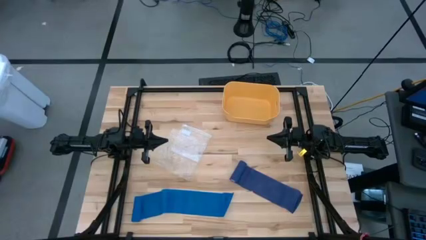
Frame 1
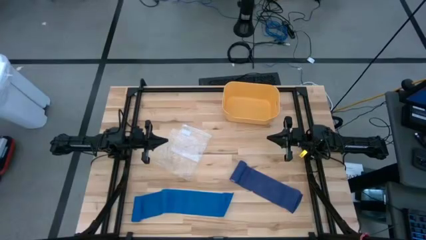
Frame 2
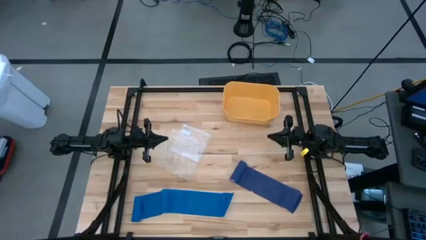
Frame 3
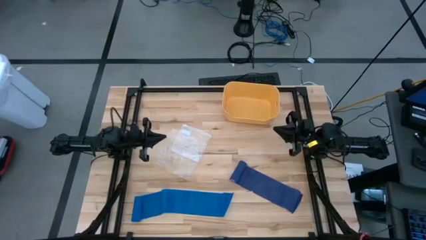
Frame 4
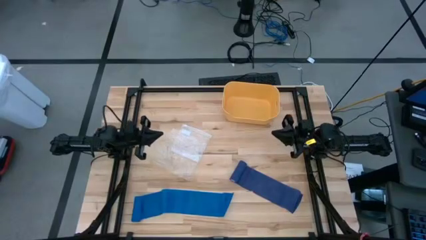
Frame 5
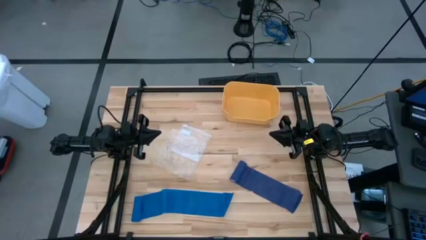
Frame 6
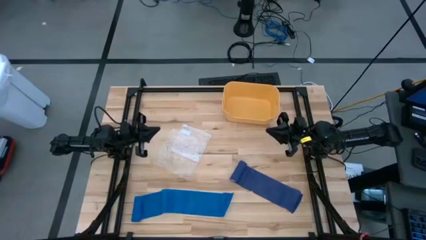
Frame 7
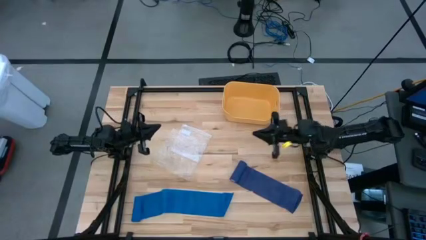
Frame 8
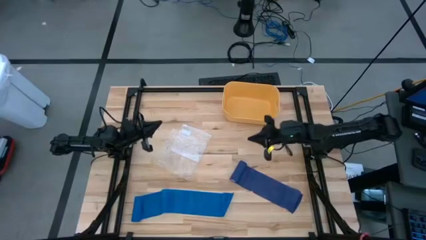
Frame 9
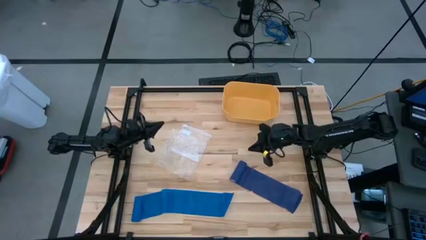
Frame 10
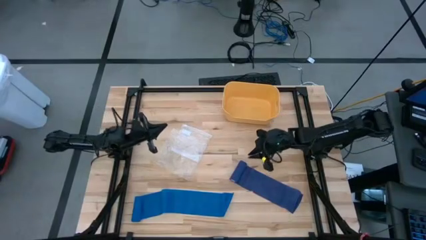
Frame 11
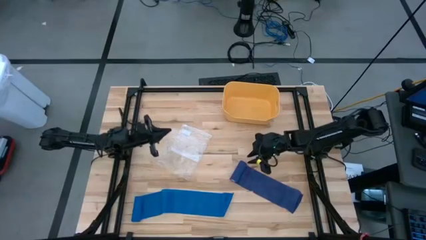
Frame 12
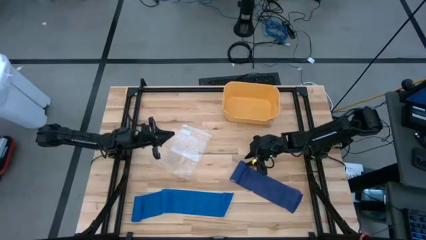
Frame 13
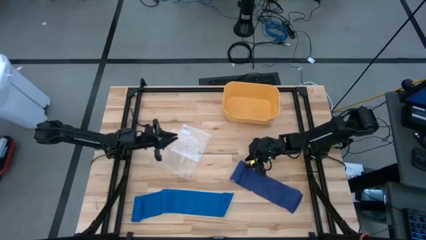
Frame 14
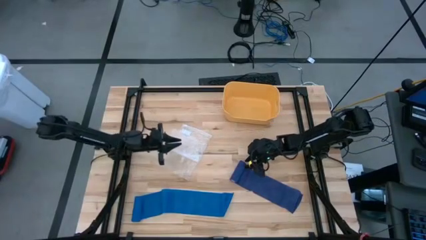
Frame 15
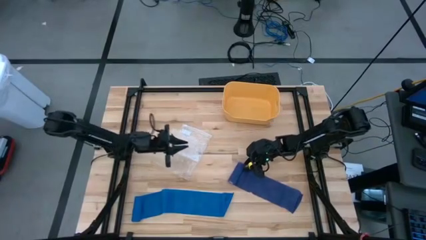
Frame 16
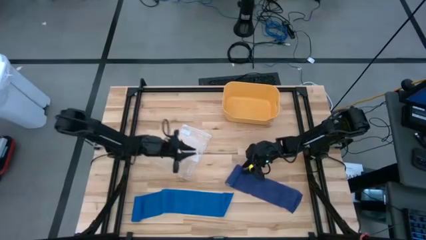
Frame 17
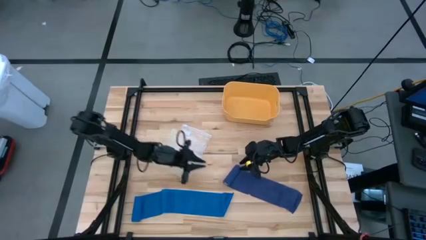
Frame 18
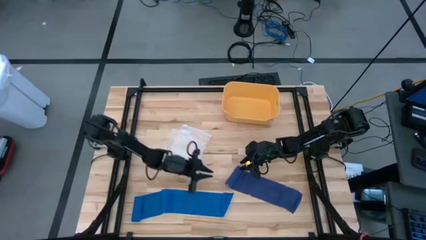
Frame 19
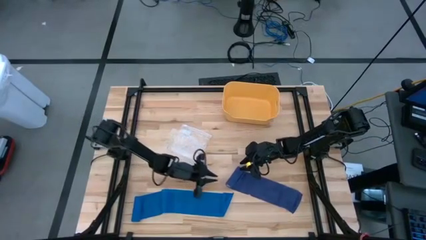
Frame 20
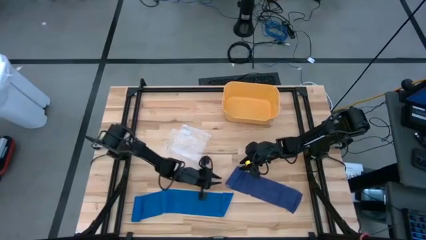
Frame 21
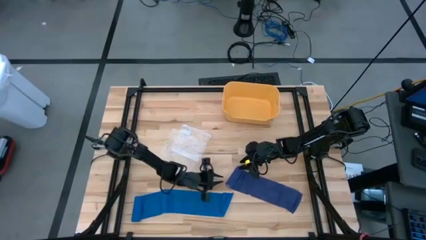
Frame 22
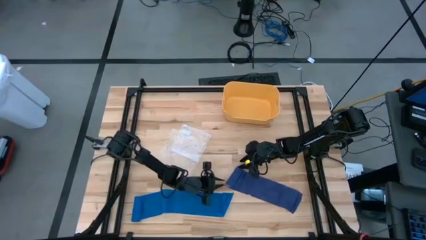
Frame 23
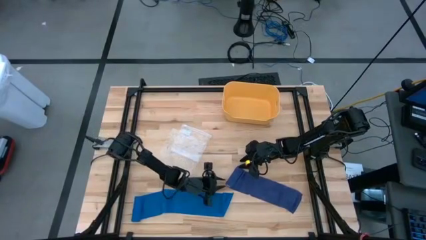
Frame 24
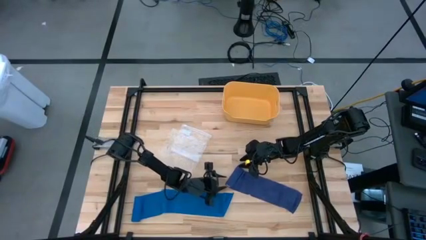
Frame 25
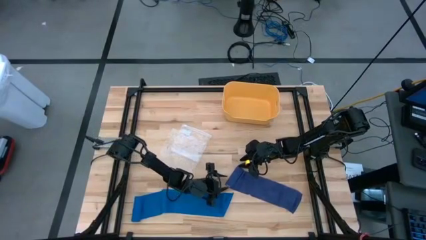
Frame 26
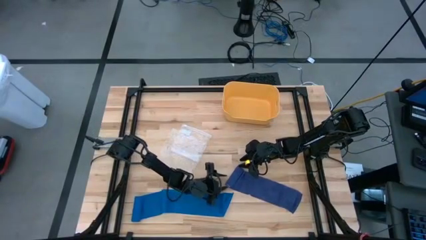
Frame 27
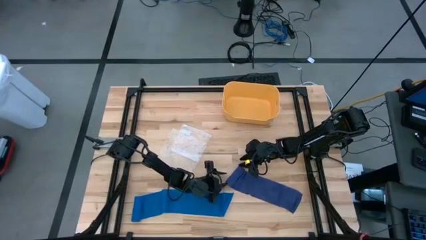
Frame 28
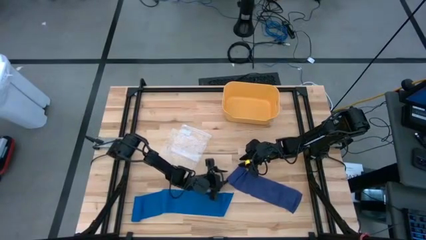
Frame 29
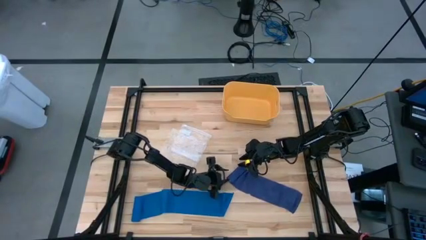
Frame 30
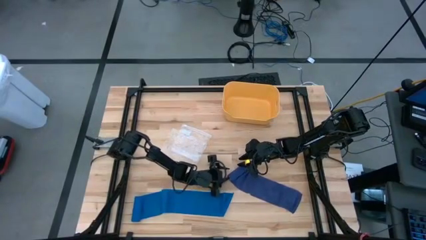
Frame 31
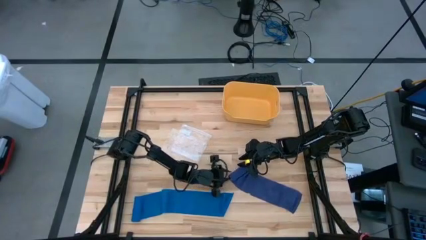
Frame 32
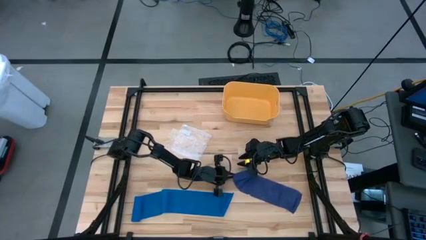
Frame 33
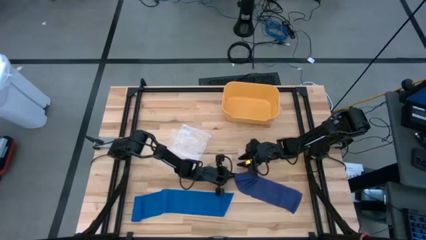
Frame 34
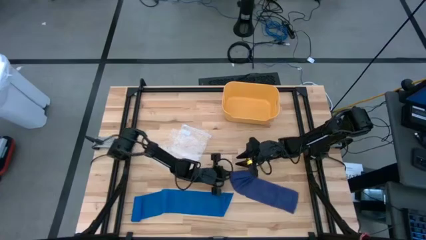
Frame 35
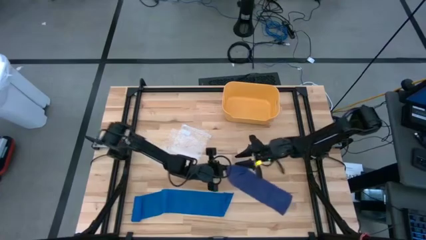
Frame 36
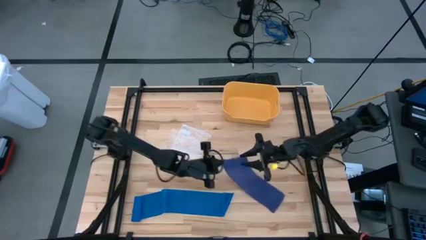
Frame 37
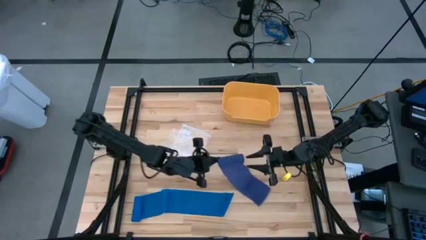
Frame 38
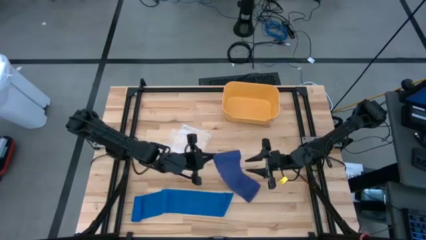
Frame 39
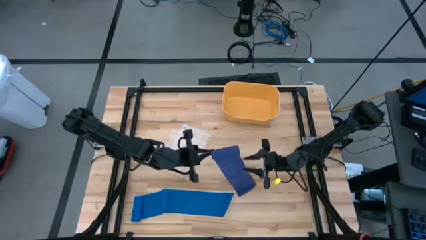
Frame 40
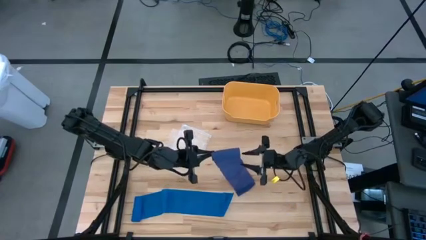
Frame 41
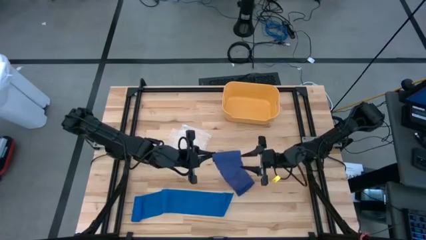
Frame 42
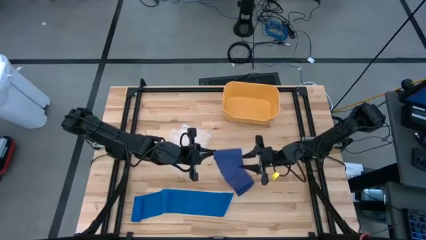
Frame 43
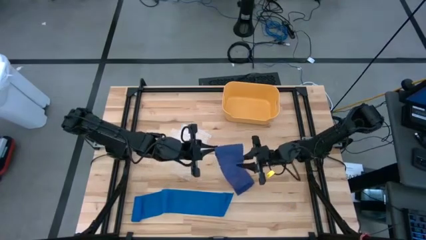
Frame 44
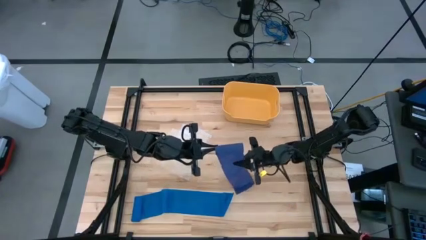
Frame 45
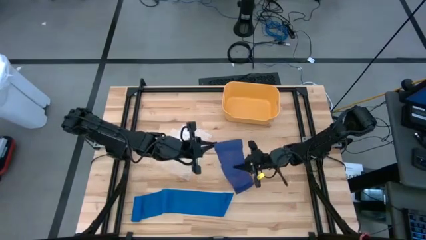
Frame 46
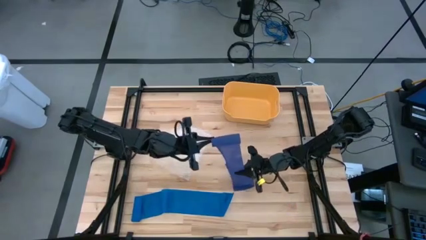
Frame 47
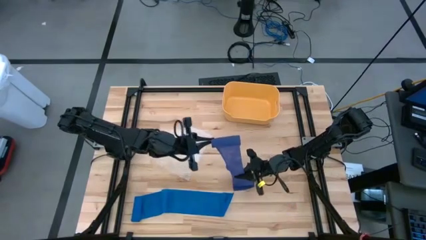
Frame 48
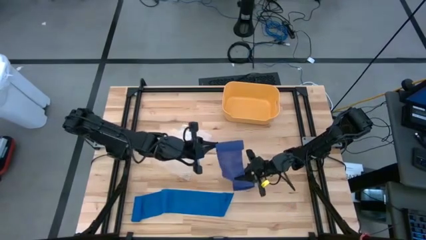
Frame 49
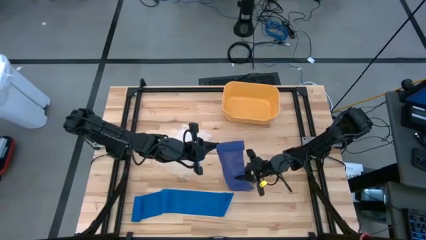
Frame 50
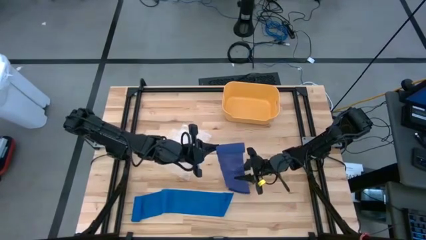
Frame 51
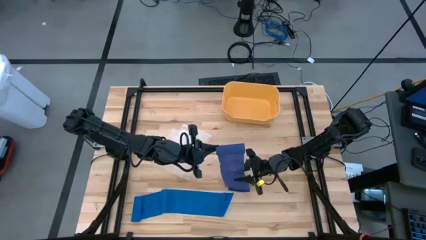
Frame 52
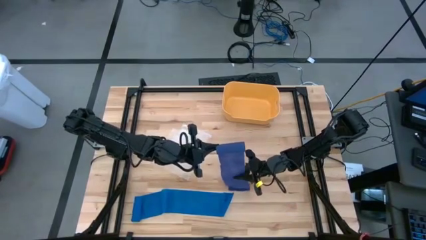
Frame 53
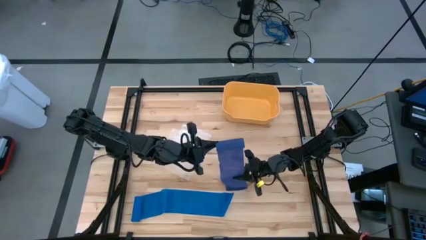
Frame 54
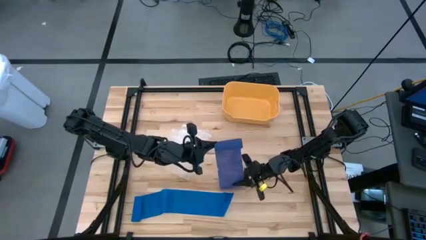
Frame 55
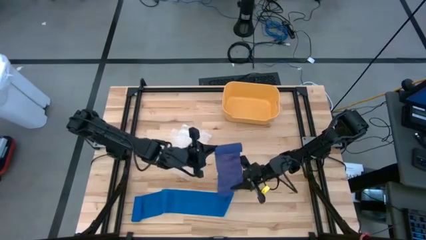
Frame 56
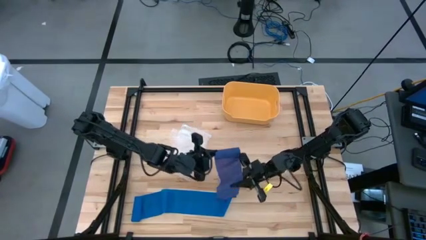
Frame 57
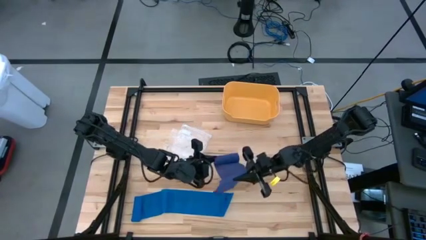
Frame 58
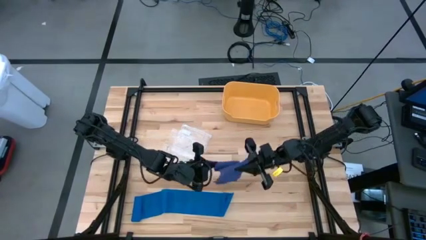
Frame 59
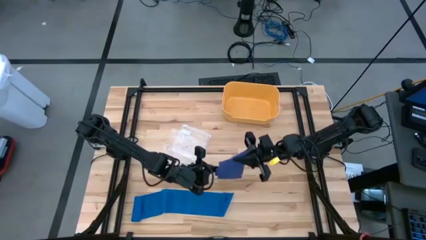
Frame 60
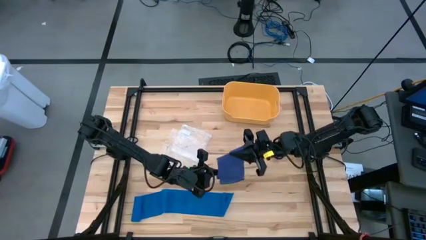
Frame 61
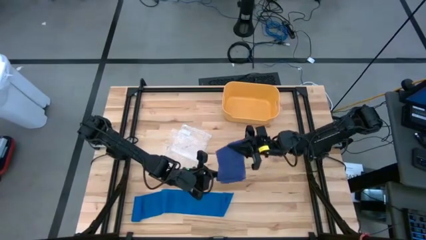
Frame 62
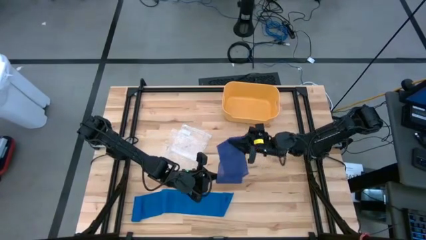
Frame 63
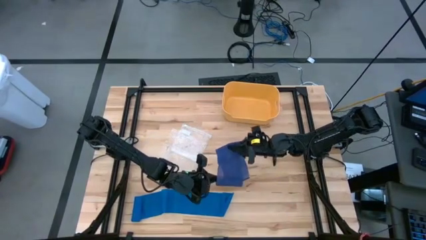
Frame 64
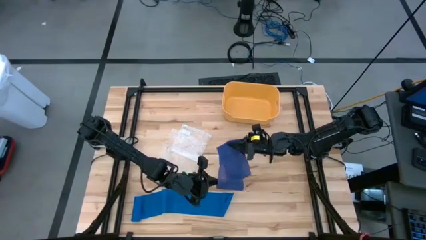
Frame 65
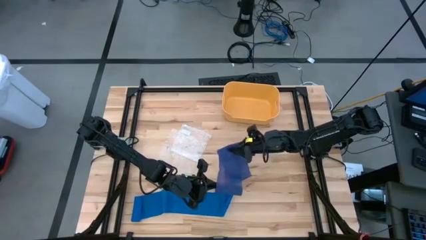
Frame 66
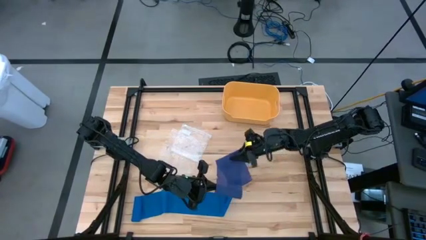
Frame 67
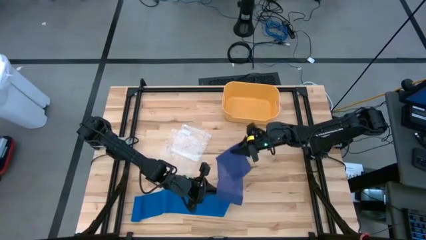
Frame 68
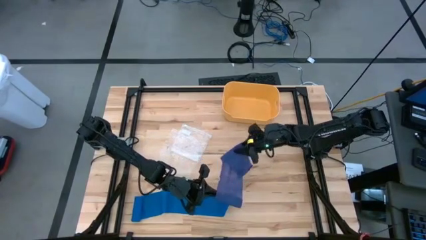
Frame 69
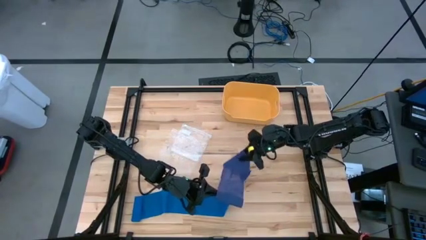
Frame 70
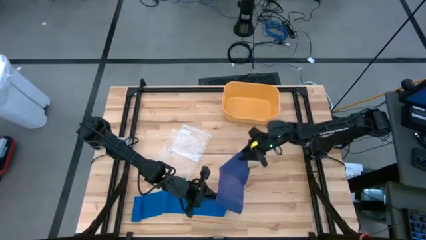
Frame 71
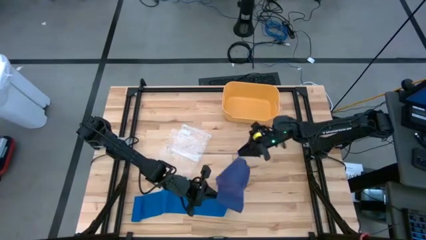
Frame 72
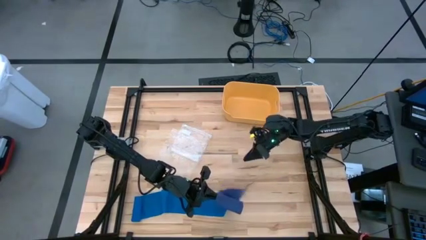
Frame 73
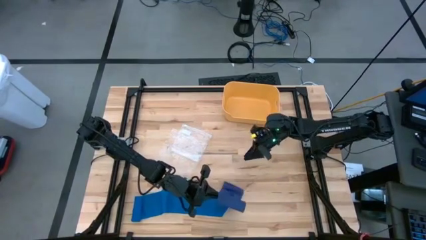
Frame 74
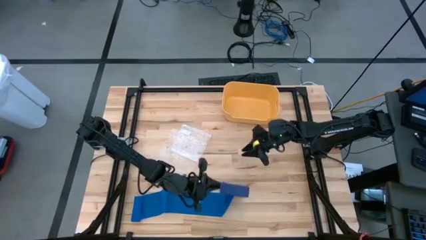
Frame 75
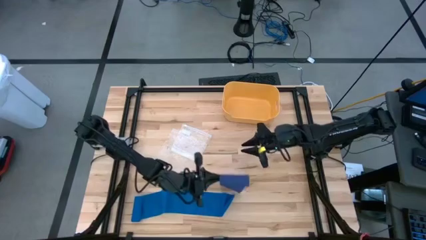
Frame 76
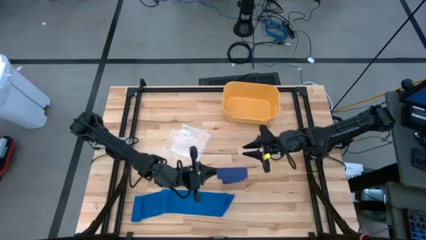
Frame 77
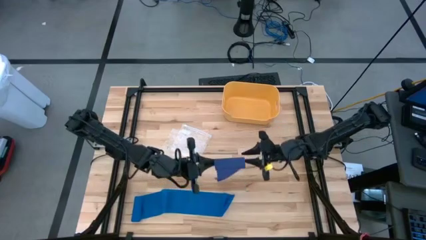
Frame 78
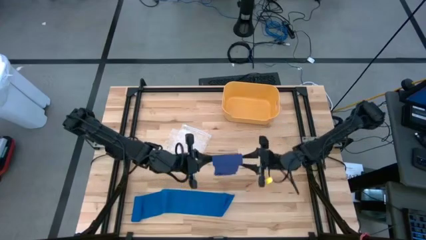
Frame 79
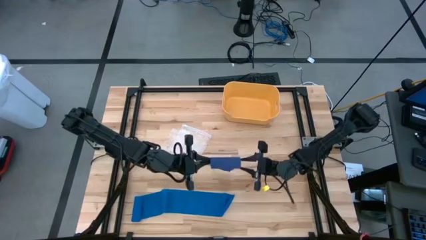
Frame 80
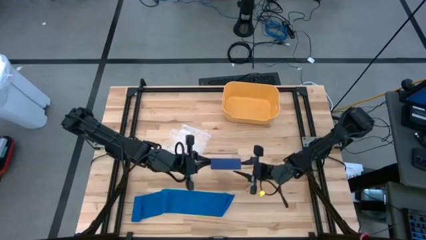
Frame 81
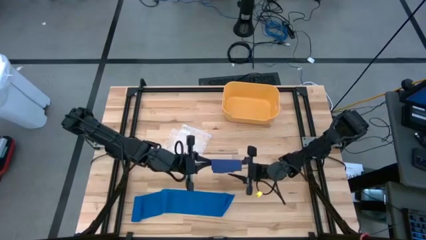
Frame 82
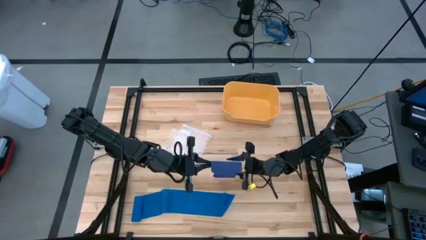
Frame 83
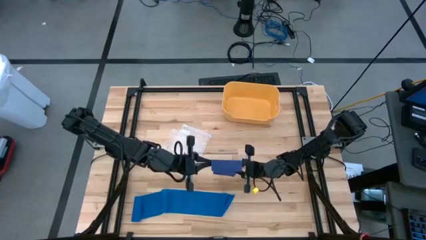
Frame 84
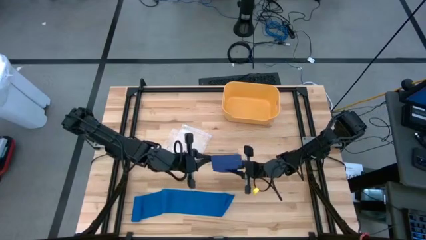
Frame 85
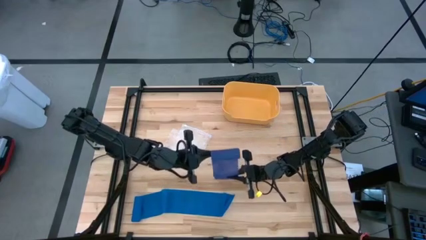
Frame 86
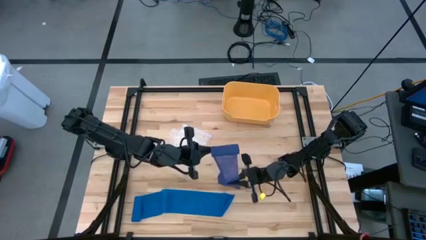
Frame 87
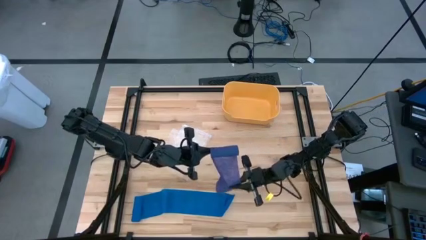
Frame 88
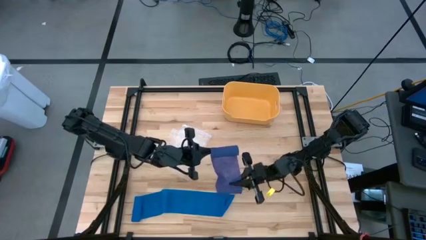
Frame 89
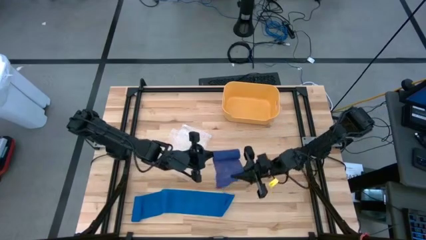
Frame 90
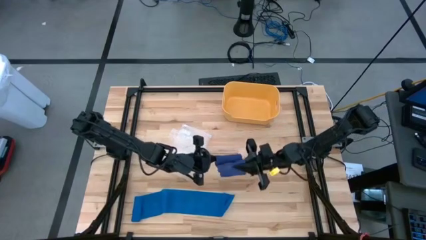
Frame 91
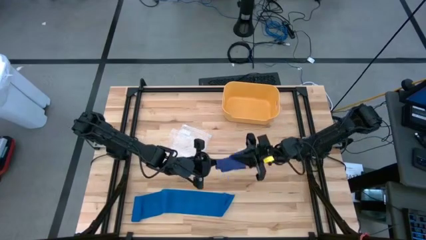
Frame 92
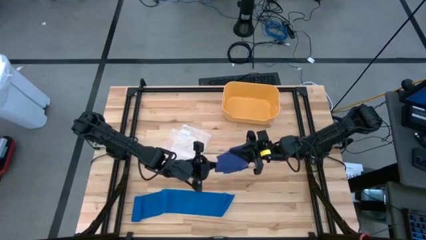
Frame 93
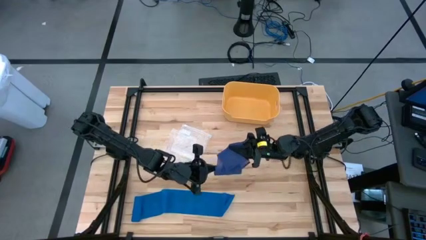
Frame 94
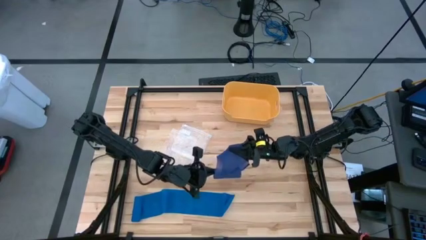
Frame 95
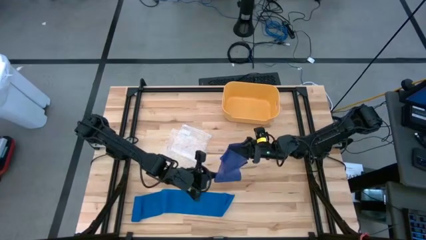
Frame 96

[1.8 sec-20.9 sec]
Task: Roll bandage
Roll the dark blue bandage
